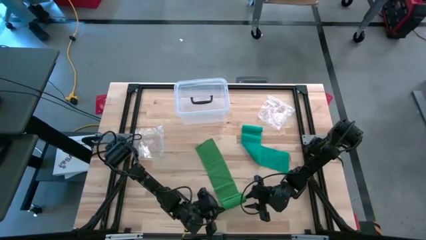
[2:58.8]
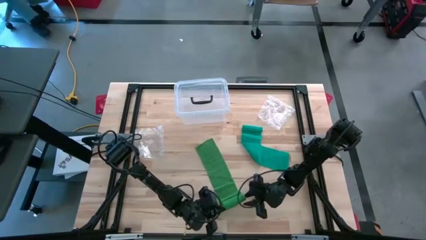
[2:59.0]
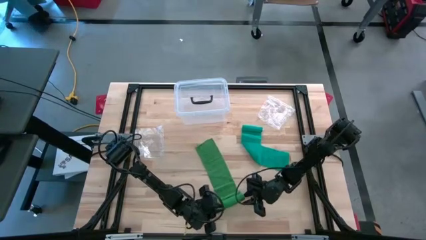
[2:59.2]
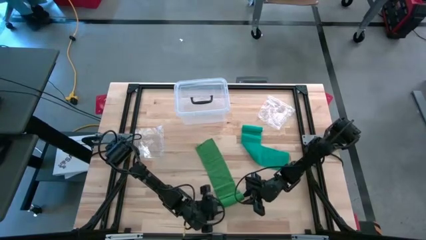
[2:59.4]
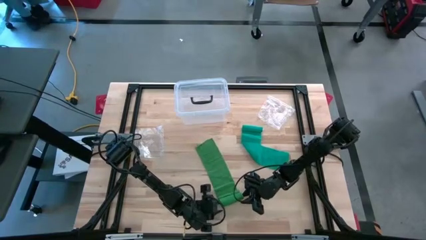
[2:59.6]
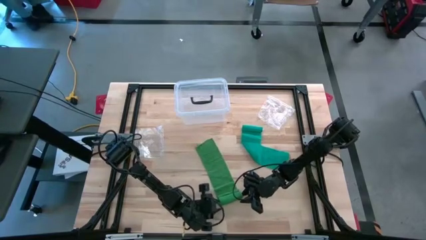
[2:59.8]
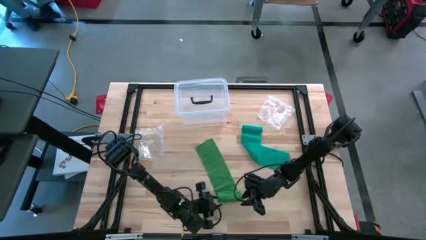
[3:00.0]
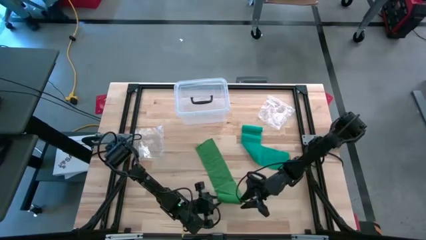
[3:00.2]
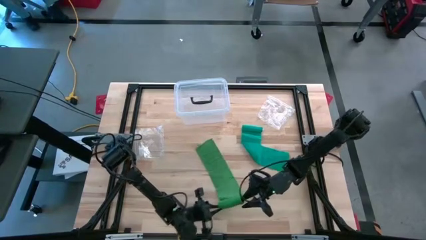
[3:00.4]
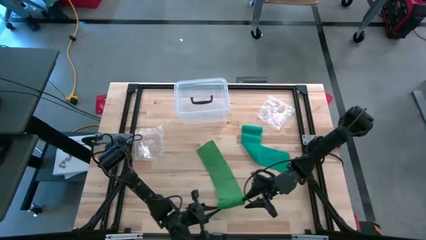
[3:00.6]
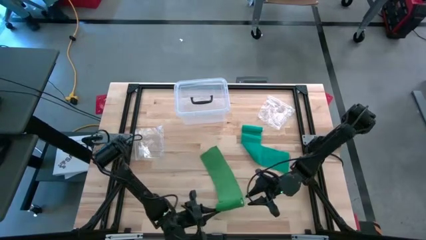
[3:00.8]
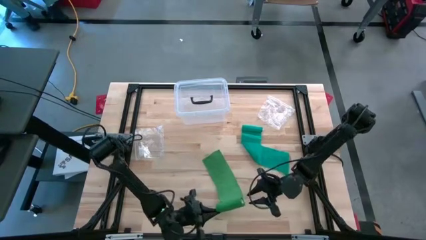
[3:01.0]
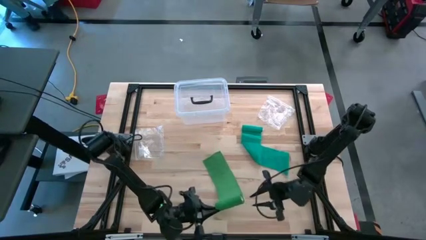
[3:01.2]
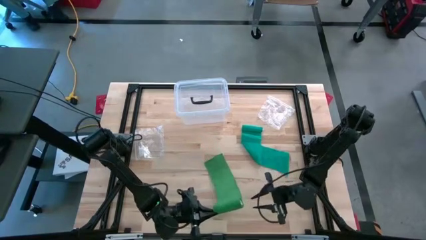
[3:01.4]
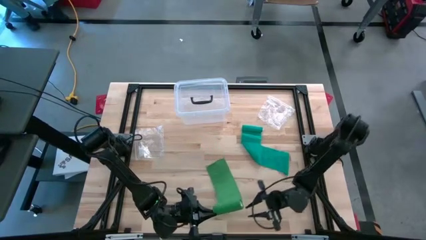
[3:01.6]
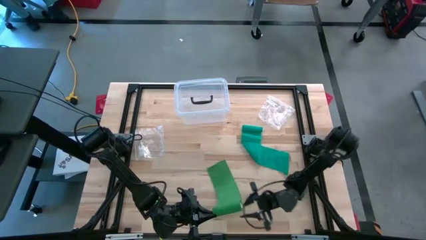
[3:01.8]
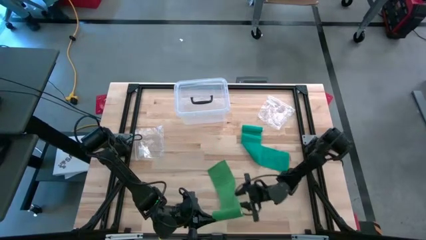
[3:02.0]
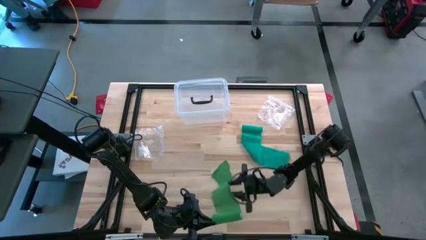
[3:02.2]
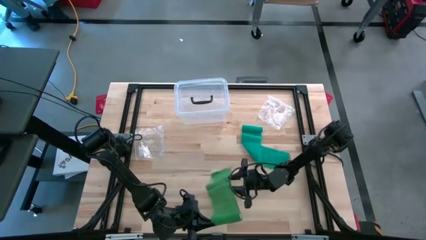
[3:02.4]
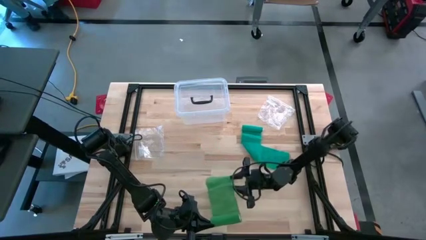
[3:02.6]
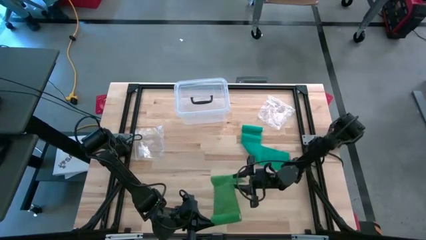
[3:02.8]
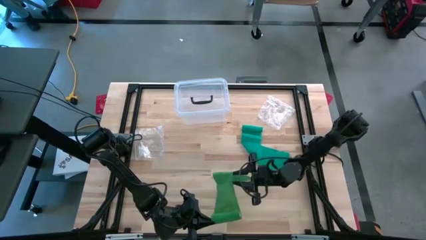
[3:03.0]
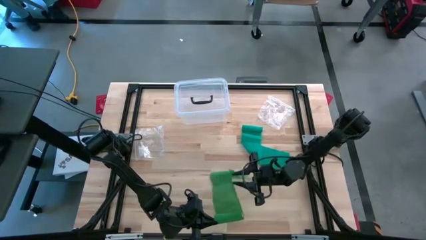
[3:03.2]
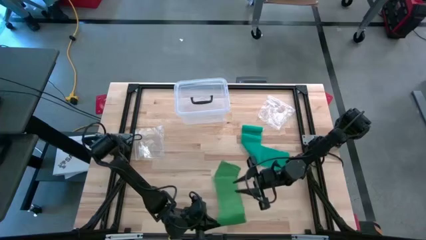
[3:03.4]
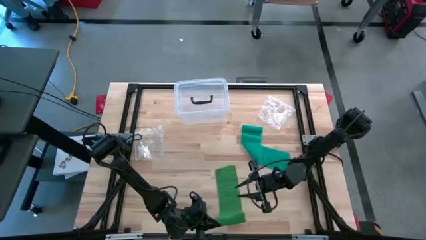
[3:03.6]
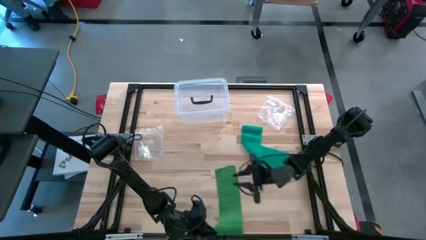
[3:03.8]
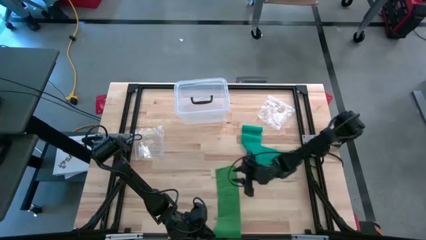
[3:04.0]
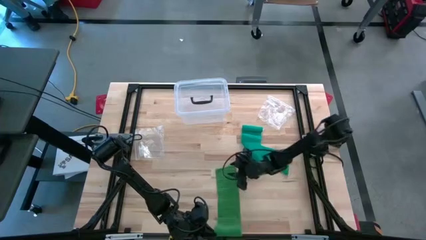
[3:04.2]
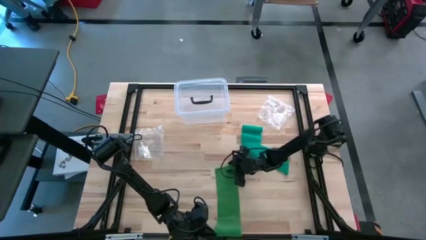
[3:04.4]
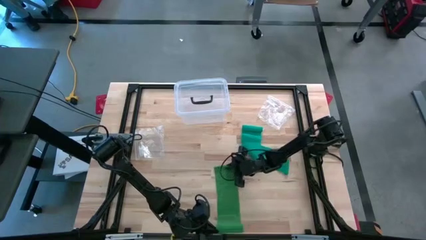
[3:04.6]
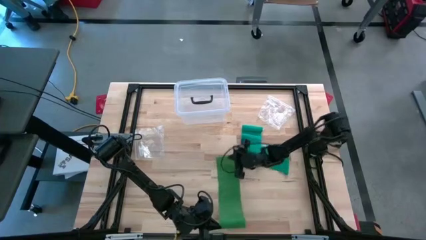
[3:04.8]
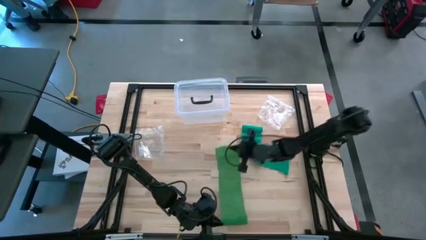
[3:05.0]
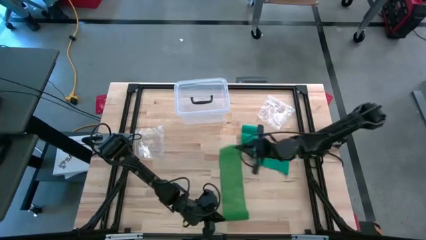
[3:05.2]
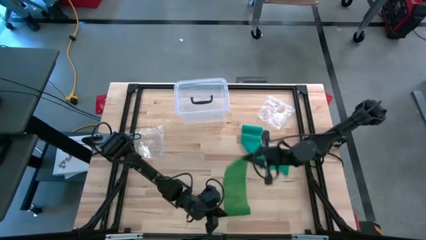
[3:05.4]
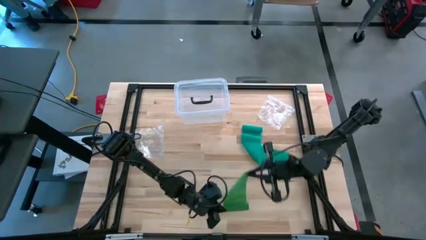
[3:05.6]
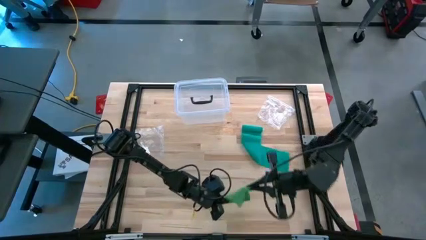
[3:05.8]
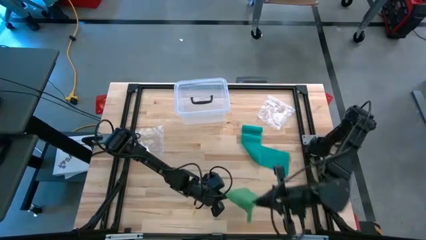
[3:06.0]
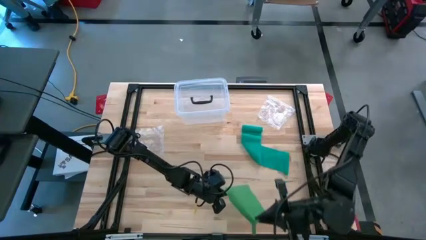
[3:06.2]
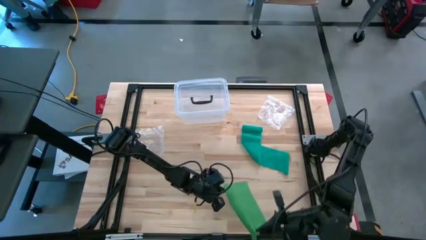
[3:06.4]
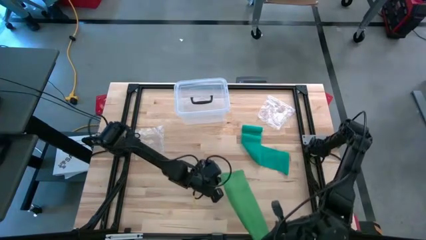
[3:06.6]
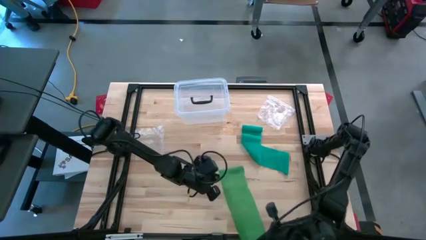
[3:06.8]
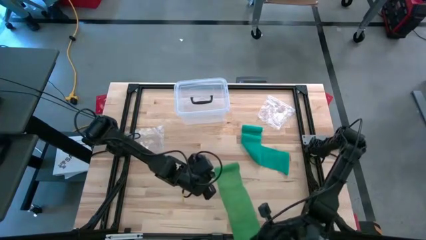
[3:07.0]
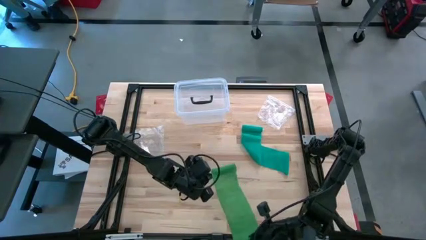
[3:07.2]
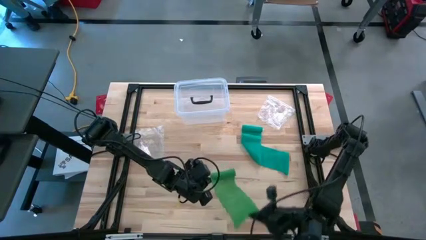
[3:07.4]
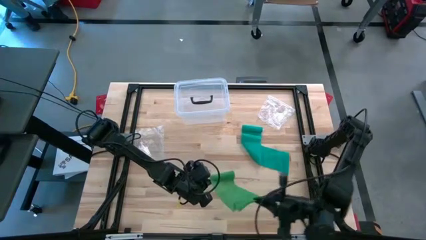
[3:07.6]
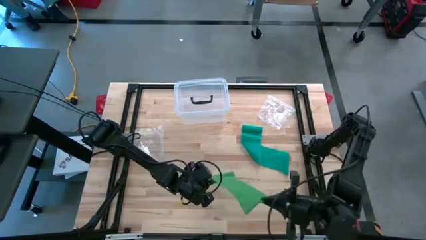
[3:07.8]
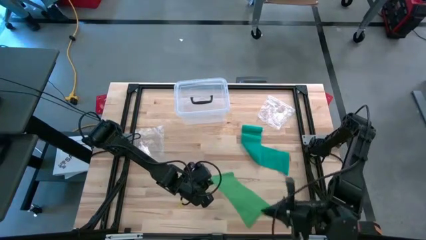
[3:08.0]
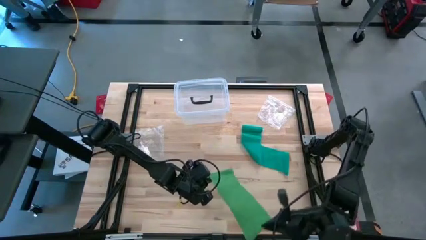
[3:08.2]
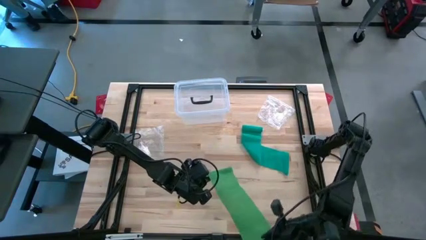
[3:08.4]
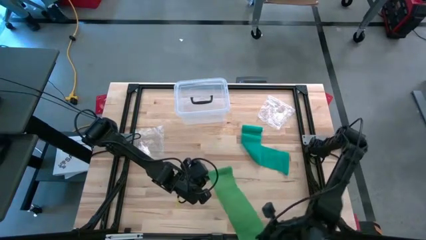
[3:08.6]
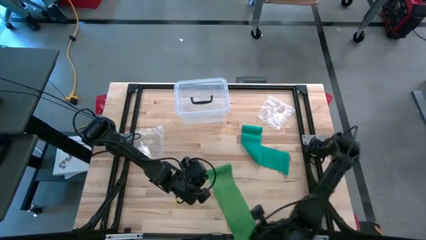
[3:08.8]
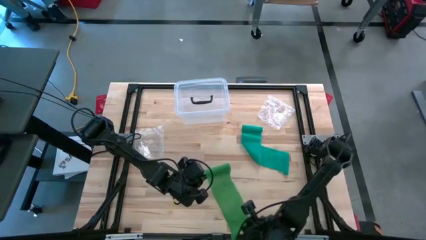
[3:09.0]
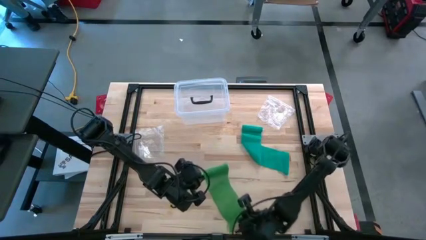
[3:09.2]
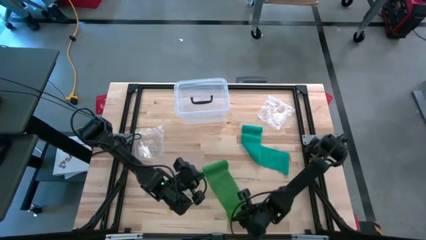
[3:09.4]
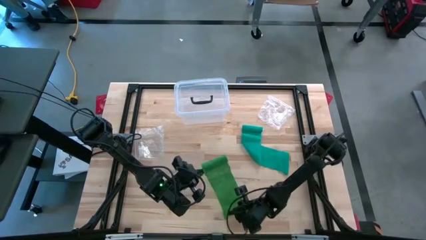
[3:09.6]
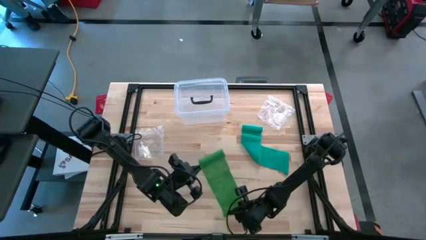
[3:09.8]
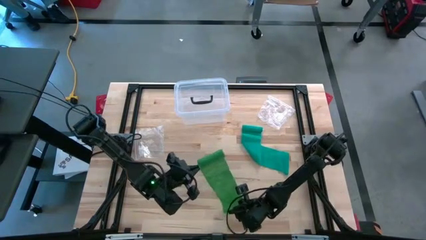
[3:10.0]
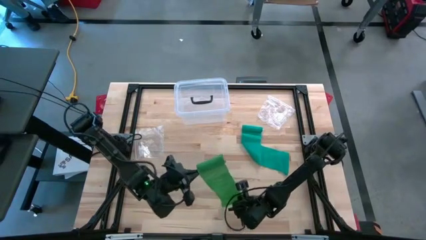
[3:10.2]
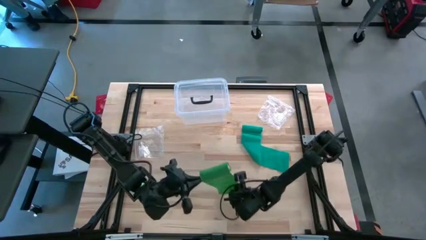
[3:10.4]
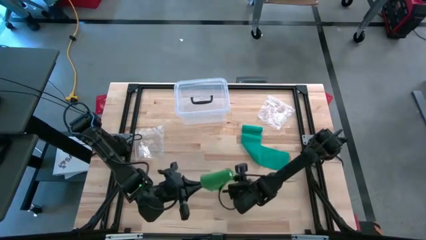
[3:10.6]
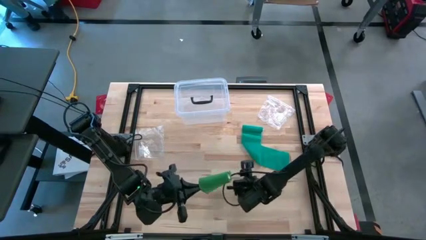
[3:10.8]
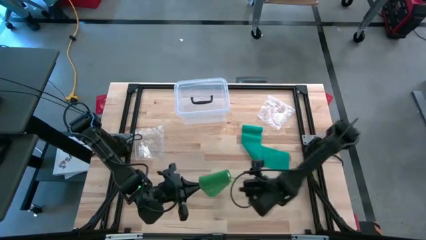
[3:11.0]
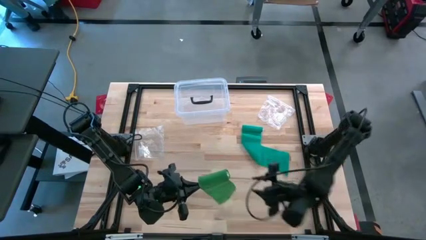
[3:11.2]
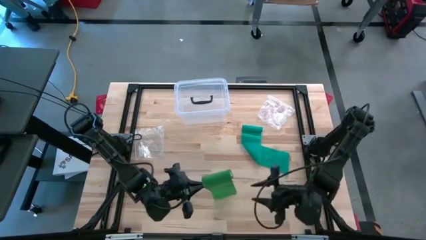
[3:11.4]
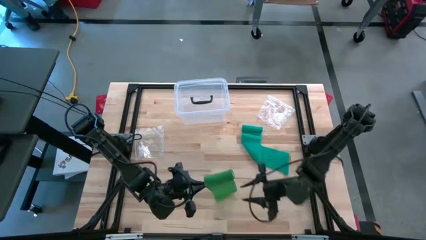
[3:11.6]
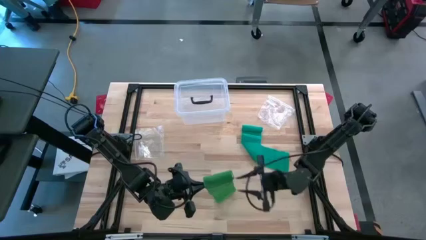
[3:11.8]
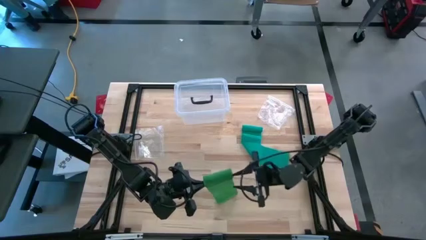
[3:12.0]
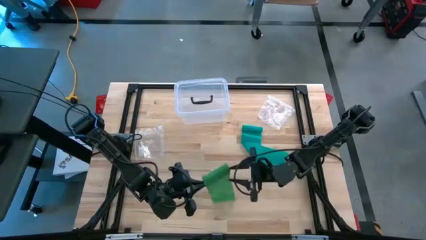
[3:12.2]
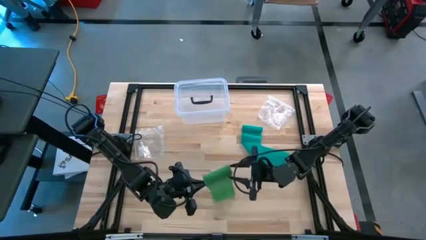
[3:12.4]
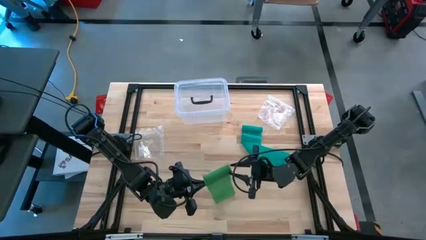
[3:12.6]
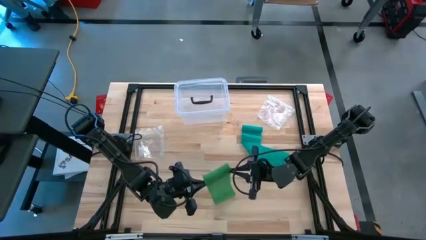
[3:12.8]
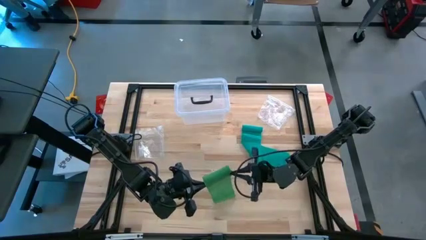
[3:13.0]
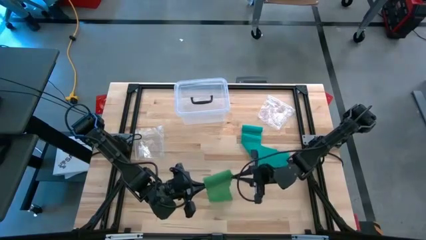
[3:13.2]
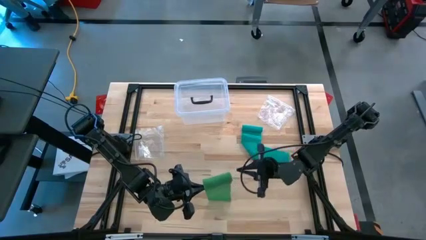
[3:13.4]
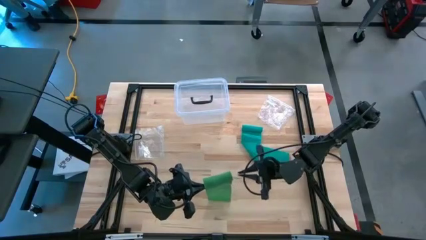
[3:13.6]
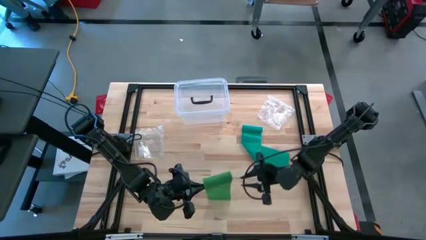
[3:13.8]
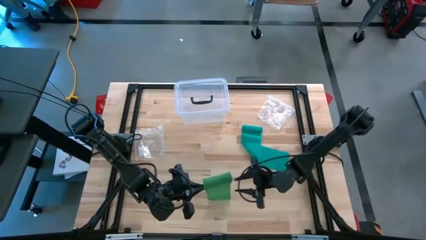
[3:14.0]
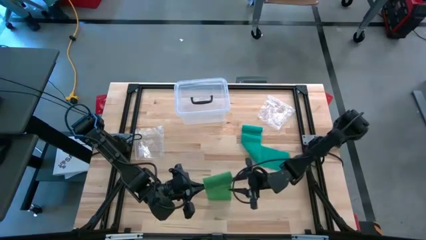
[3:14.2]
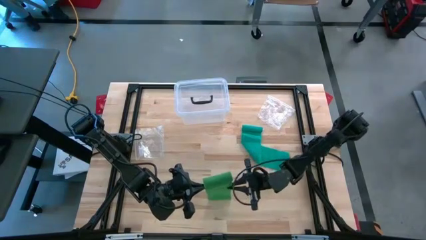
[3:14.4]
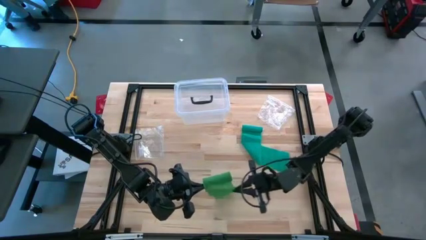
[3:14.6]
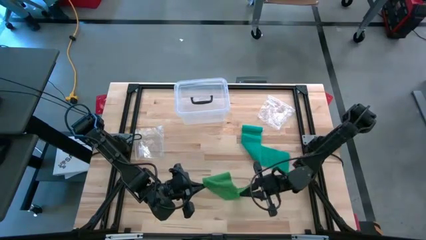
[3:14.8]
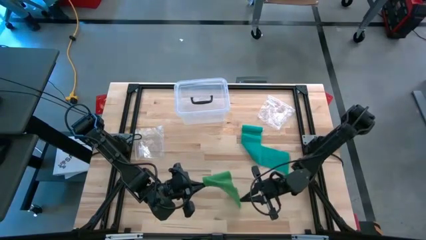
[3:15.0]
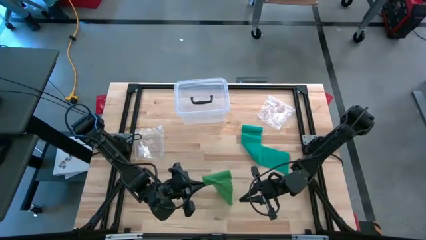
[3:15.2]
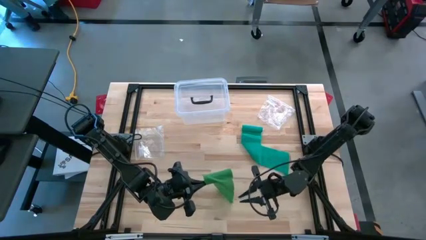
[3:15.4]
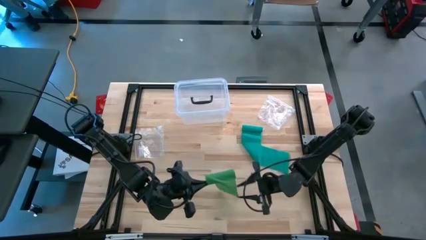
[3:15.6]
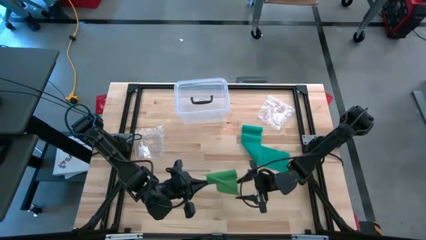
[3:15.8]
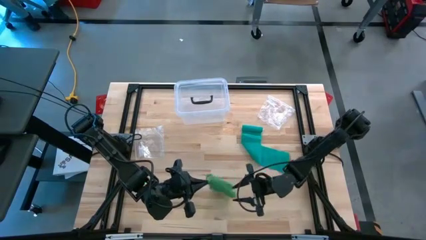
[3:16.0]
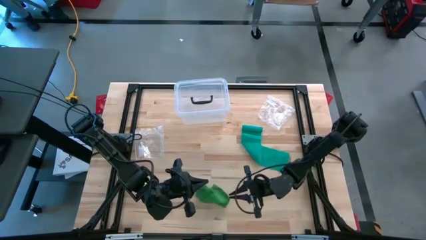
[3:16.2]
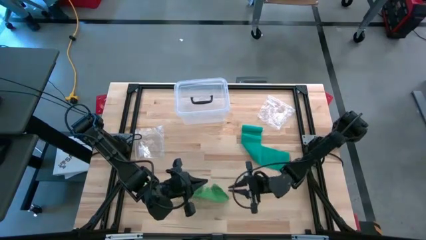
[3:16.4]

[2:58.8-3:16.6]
Task: Roll bandage
Roll the green bandage
